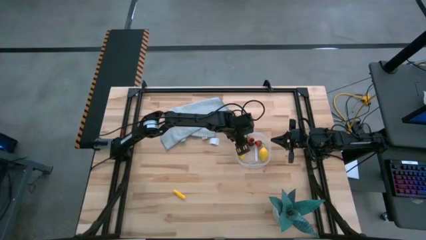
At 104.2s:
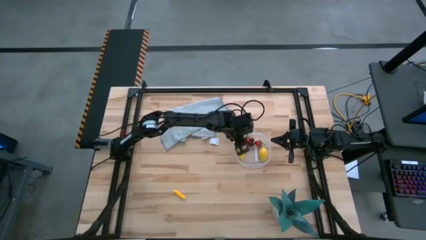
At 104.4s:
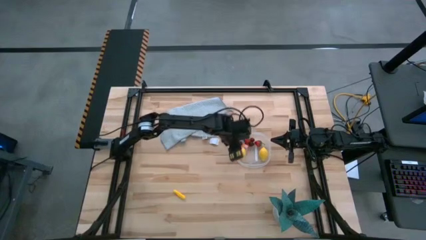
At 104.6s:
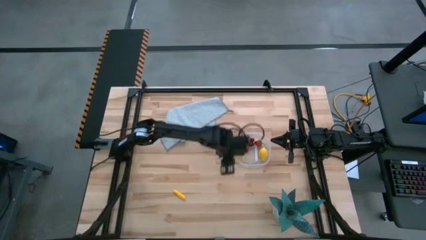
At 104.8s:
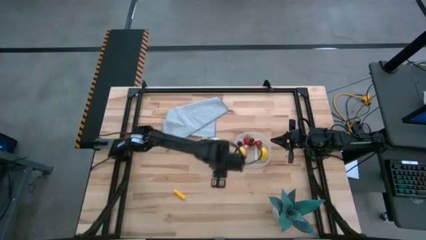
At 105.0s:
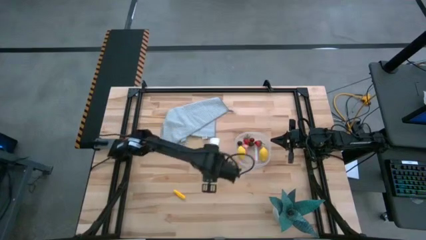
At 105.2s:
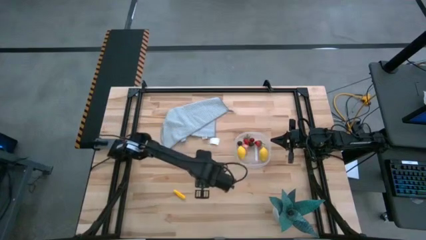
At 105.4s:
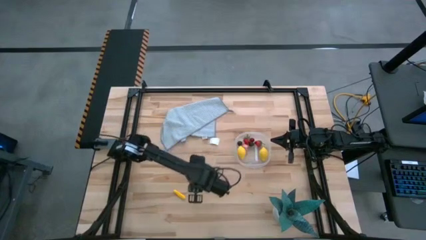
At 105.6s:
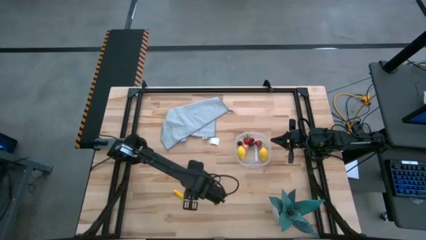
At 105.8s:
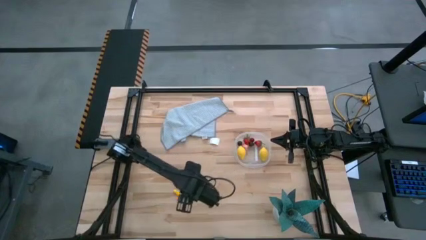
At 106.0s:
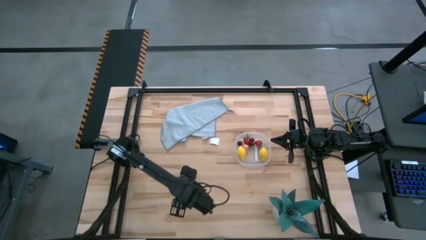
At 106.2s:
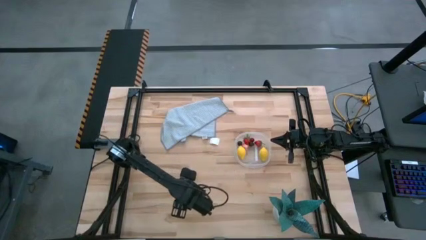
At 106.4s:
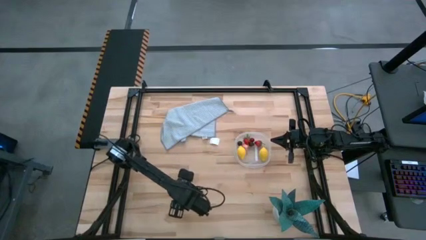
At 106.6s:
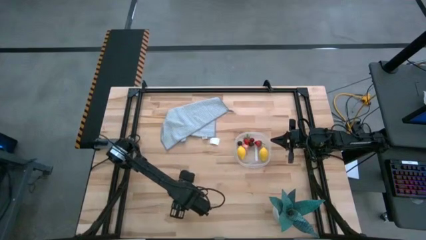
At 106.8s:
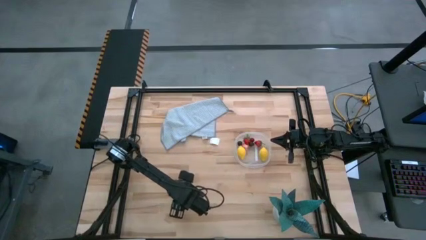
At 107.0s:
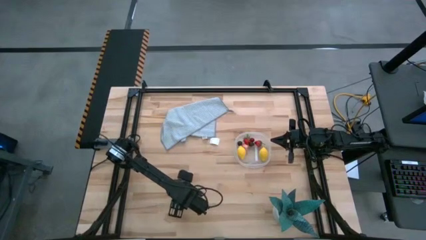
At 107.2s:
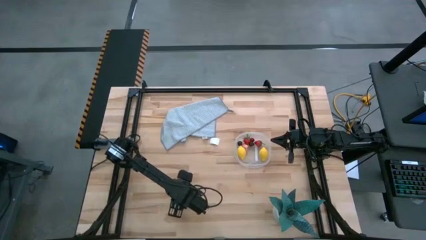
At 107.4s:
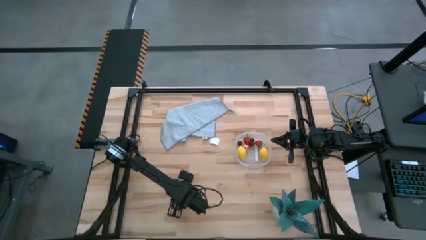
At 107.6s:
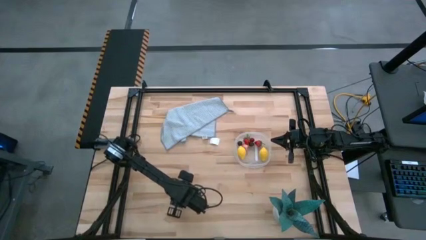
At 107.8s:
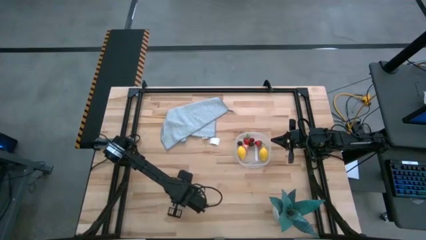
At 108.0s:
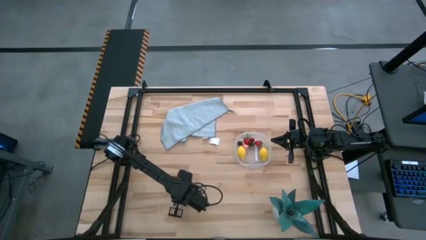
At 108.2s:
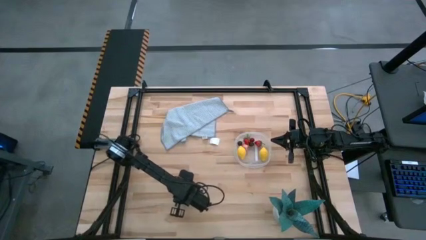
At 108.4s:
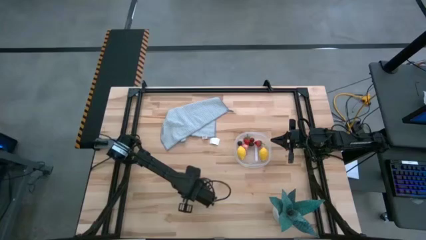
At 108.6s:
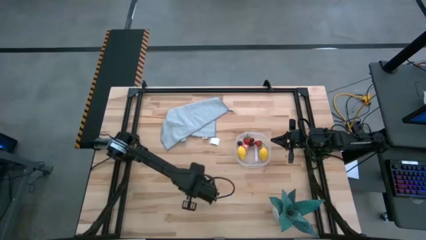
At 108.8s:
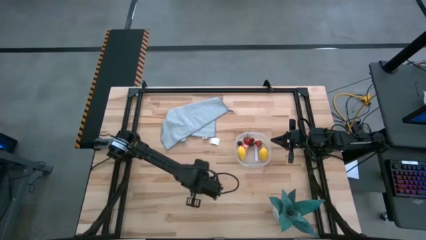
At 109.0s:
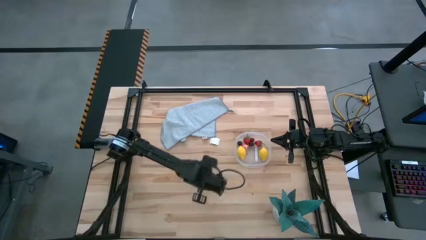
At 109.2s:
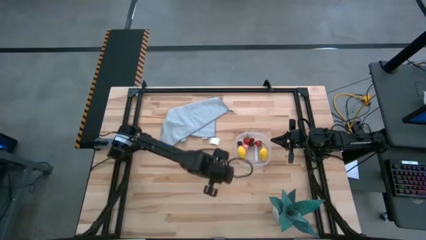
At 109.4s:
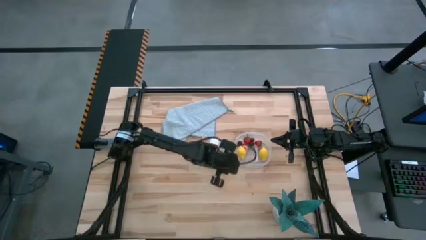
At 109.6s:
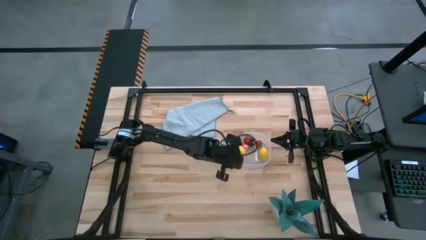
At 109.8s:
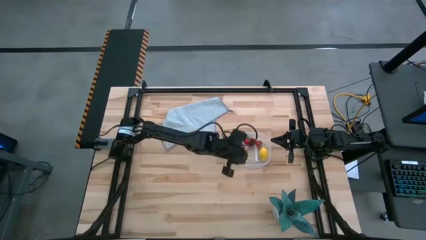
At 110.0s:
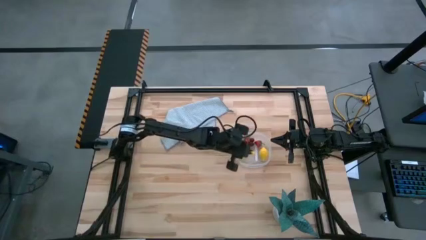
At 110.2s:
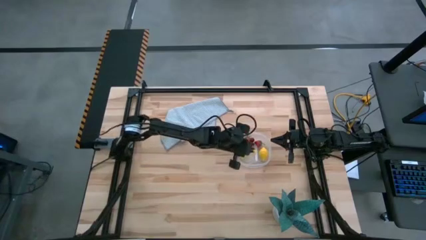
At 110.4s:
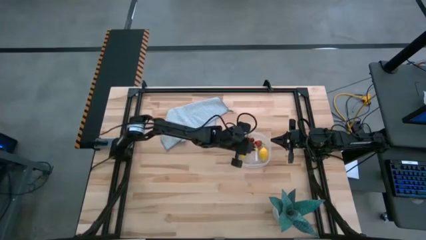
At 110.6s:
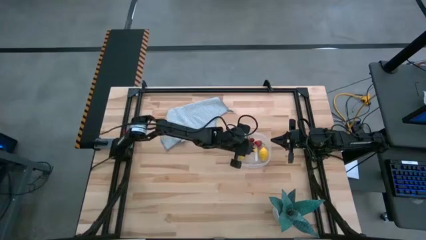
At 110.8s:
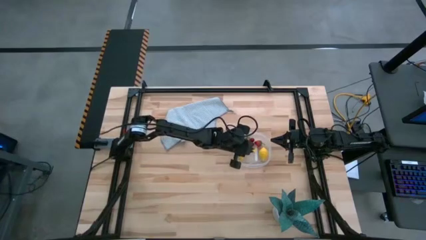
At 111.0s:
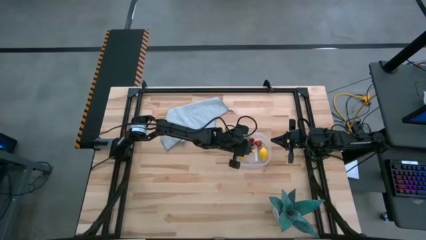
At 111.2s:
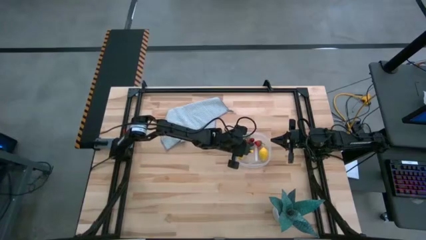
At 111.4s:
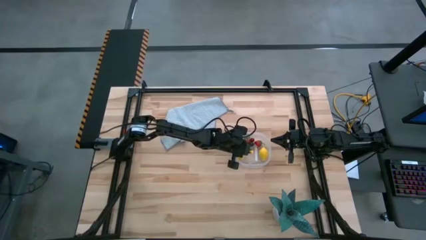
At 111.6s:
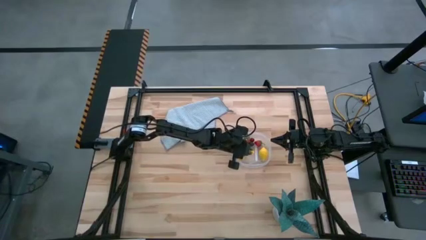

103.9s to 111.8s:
Task: Pick and placing Produce into tupperware
Put the corn into the transparent container

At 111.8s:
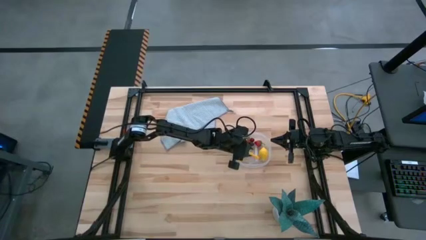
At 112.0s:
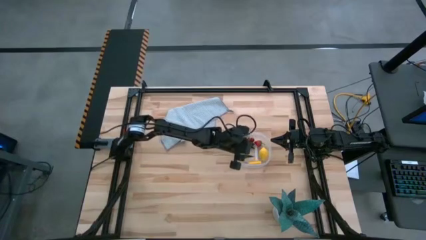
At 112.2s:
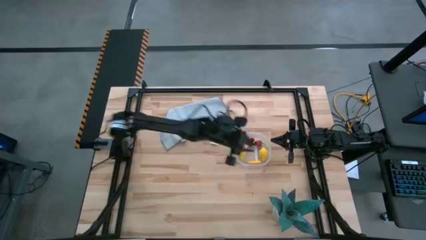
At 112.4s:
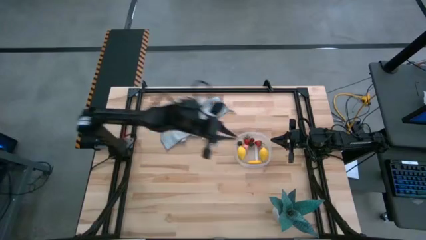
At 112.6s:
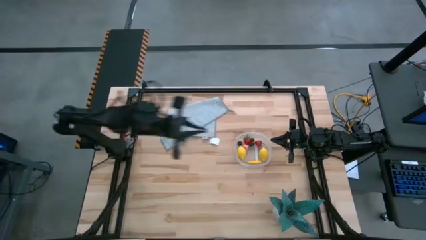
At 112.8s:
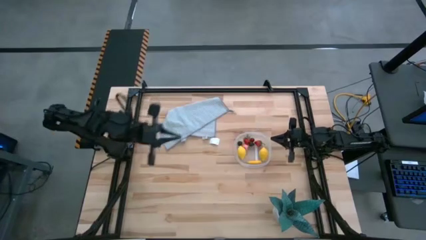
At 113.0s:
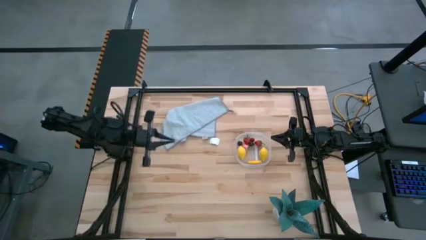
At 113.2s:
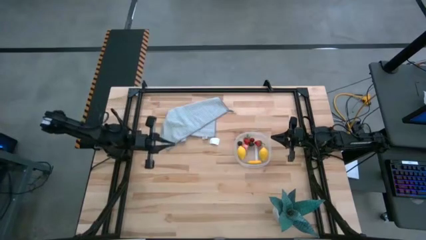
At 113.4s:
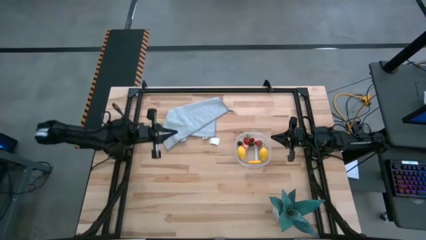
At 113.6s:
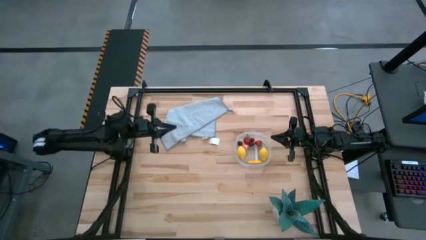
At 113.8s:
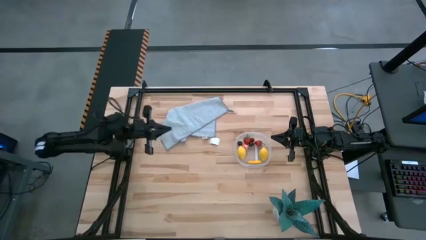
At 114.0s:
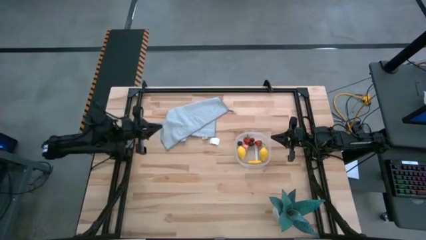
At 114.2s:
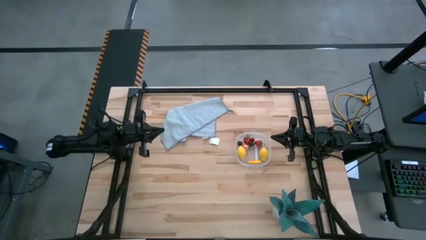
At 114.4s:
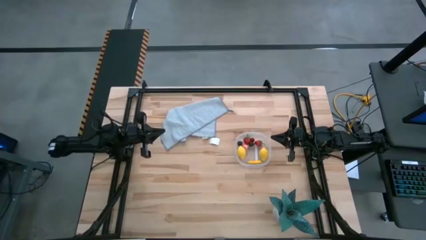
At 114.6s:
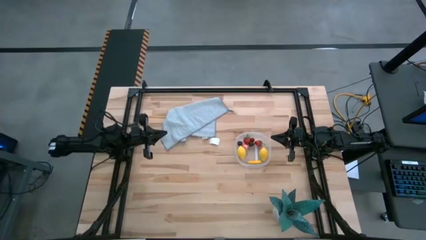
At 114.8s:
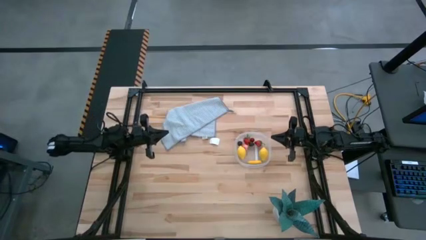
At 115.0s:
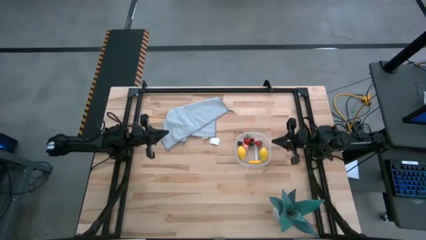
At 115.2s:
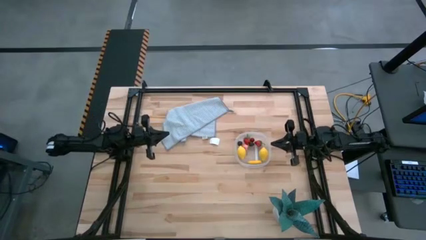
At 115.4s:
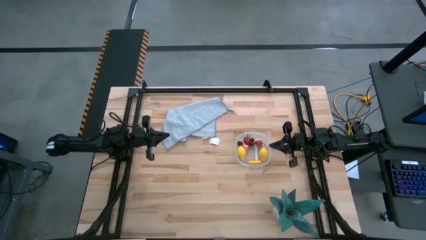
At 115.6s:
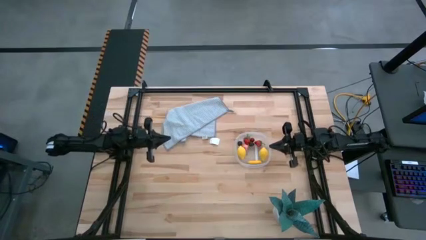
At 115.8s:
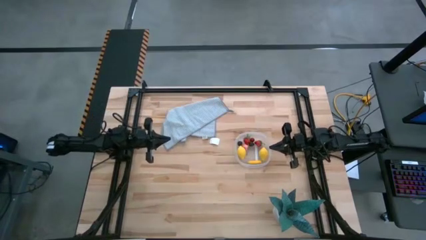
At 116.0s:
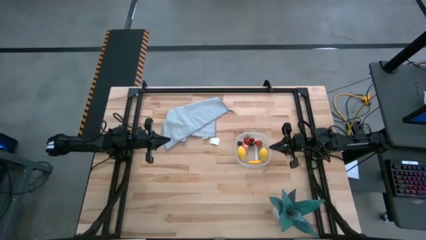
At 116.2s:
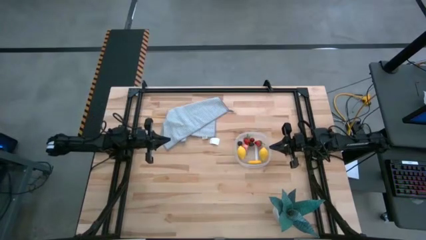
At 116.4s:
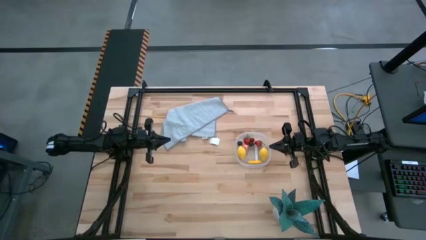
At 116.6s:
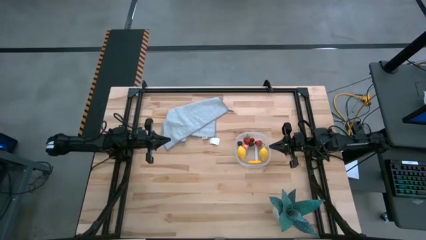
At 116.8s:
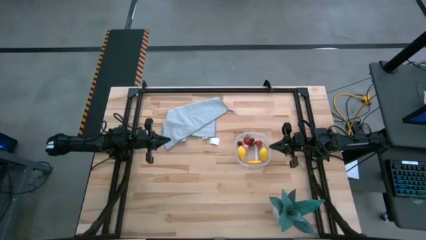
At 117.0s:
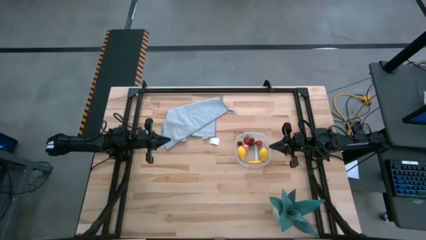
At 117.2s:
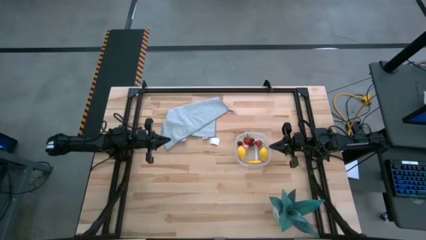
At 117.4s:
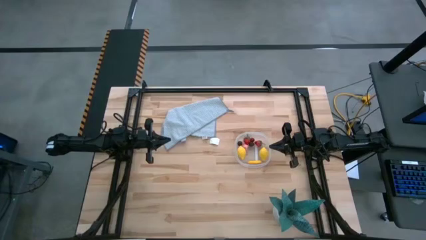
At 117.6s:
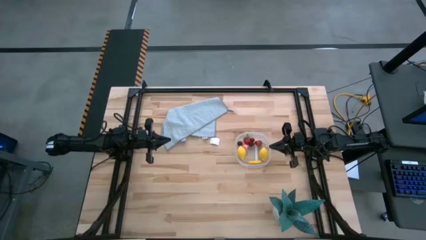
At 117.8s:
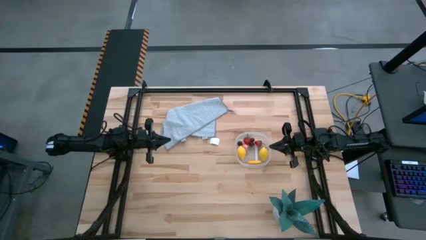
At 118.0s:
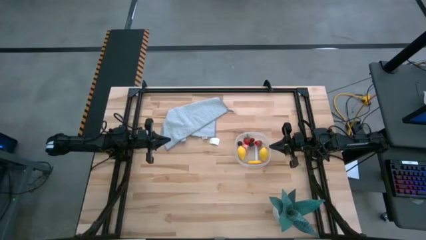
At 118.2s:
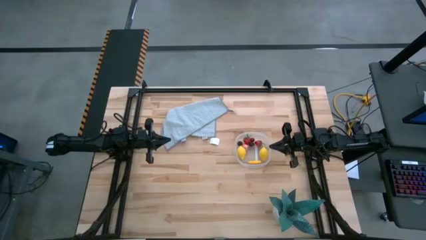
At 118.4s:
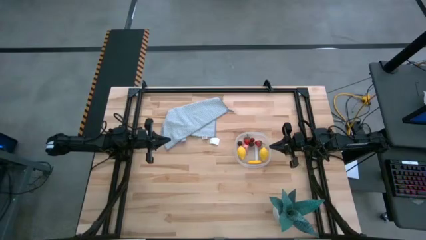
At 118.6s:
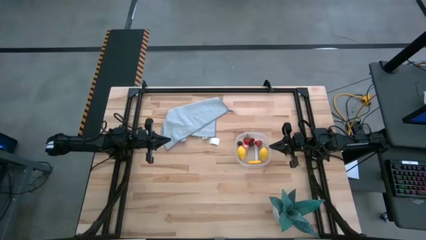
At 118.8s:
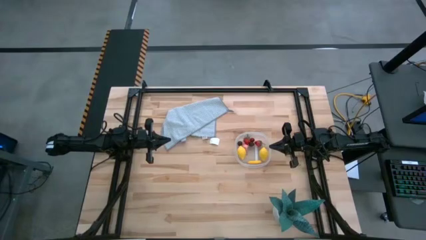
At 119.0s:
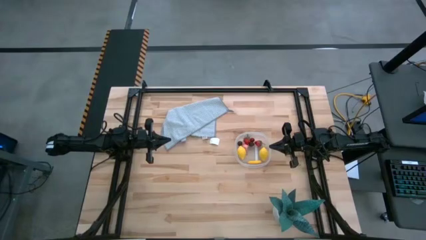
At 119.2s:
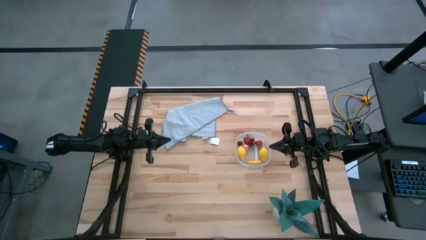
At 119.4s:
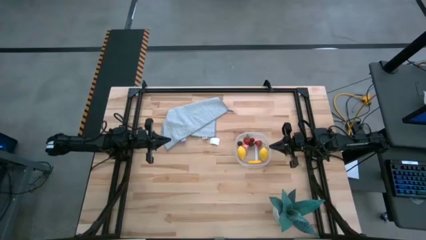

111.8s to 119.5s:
Return to Home Position
